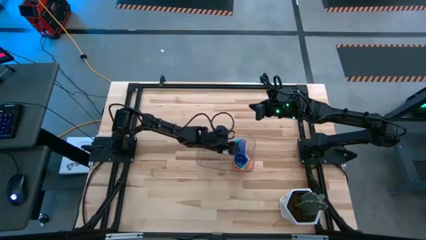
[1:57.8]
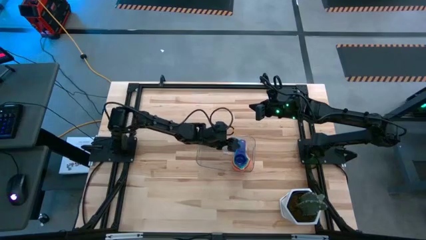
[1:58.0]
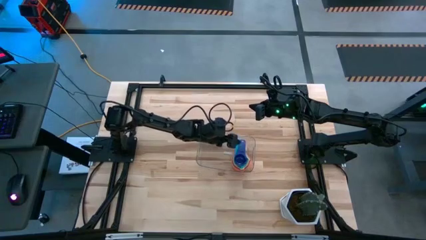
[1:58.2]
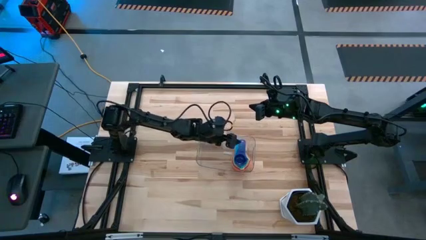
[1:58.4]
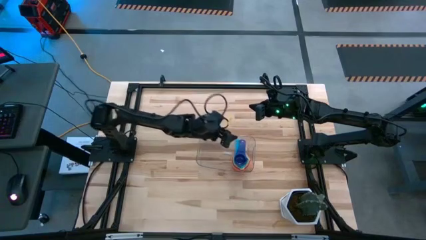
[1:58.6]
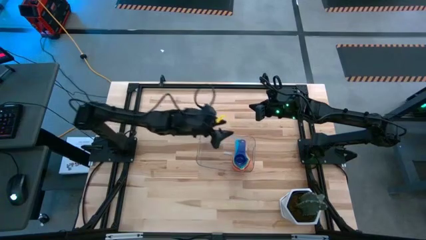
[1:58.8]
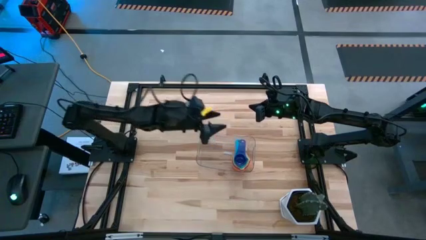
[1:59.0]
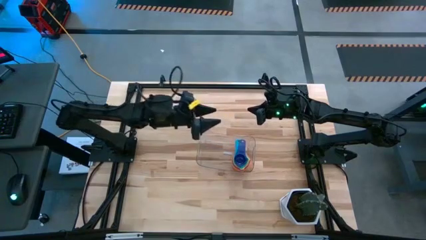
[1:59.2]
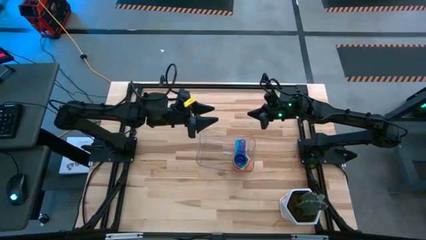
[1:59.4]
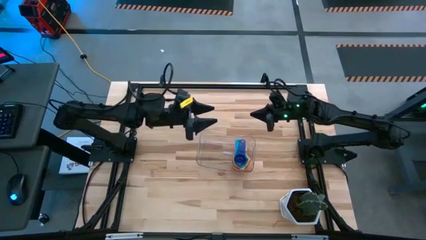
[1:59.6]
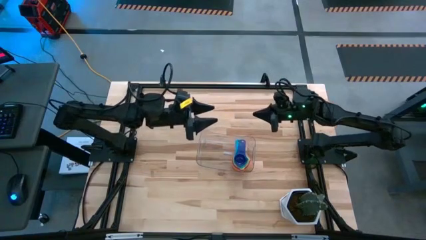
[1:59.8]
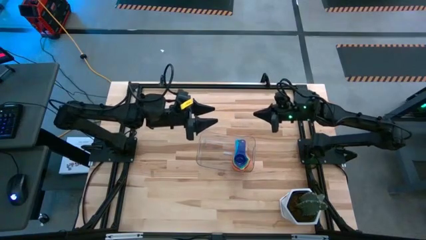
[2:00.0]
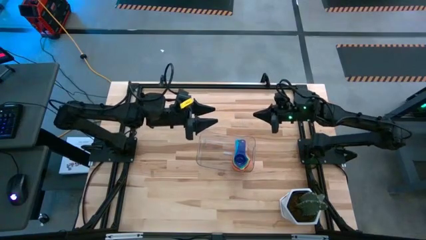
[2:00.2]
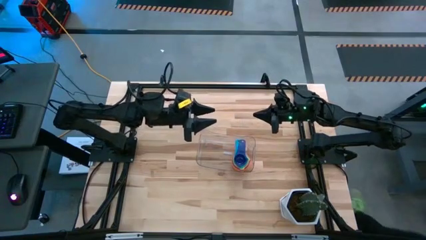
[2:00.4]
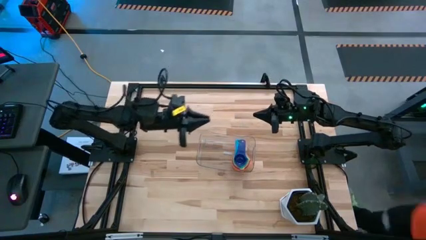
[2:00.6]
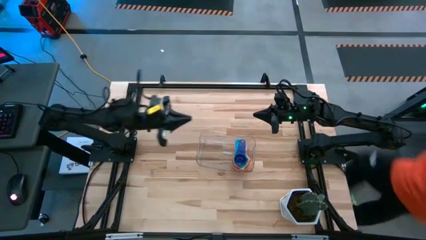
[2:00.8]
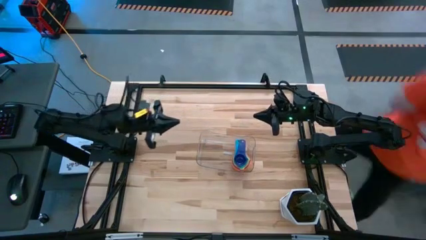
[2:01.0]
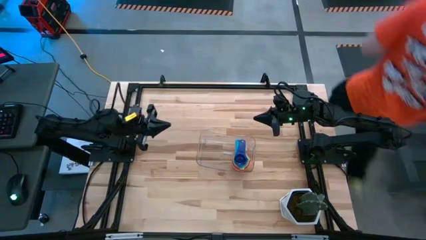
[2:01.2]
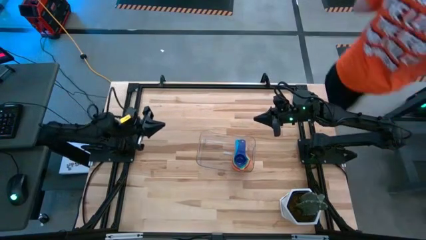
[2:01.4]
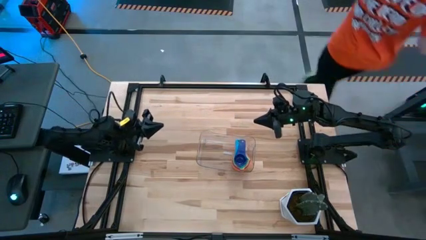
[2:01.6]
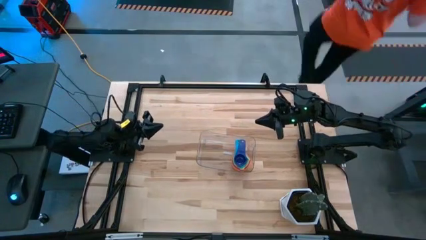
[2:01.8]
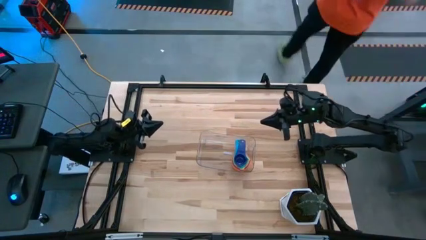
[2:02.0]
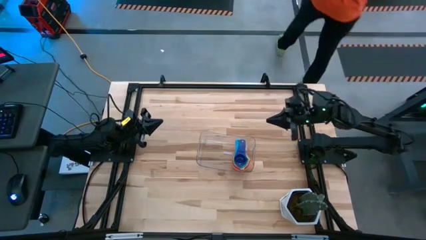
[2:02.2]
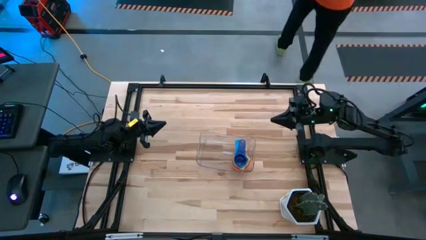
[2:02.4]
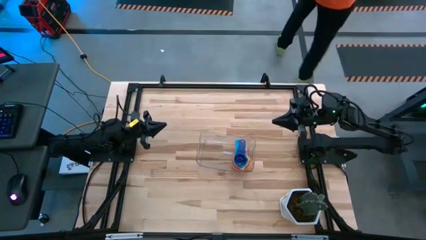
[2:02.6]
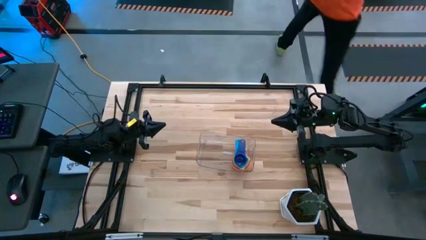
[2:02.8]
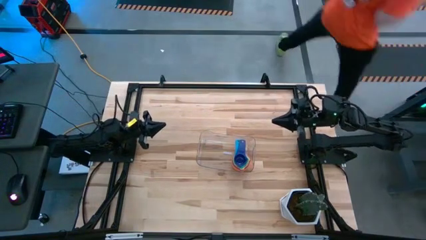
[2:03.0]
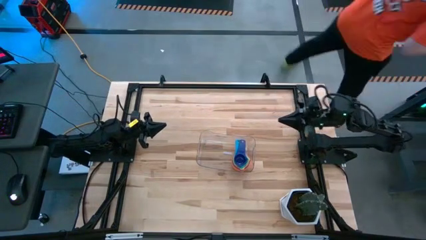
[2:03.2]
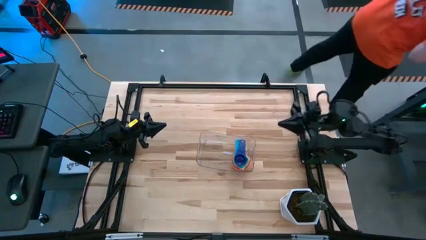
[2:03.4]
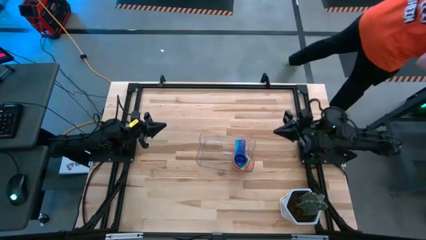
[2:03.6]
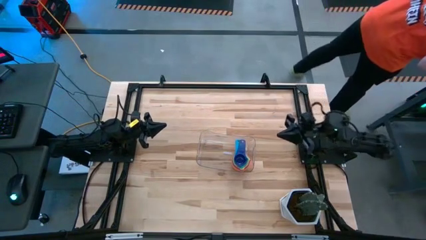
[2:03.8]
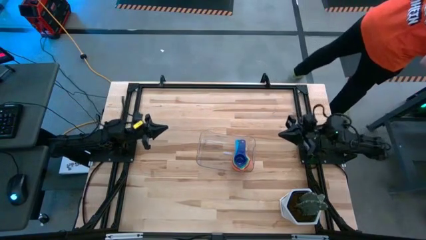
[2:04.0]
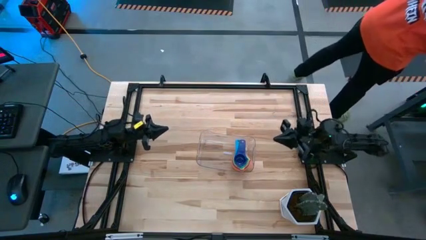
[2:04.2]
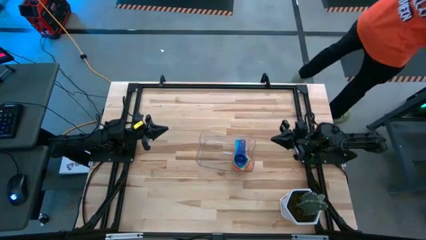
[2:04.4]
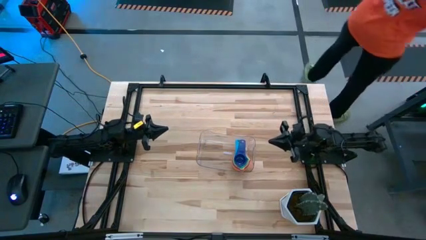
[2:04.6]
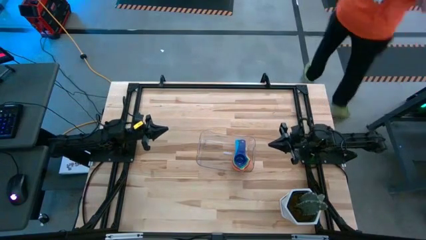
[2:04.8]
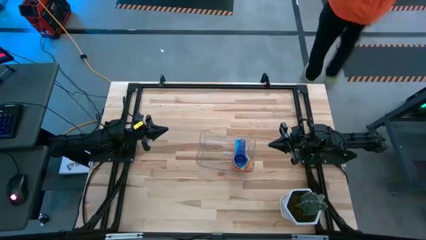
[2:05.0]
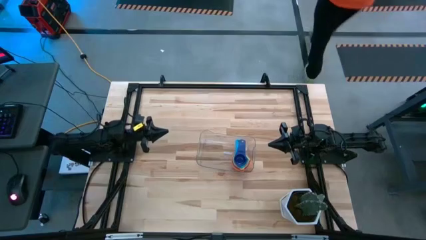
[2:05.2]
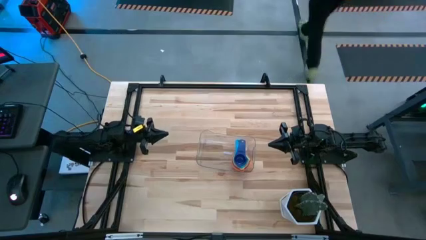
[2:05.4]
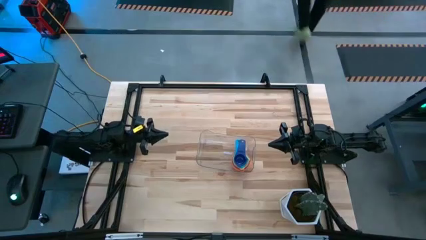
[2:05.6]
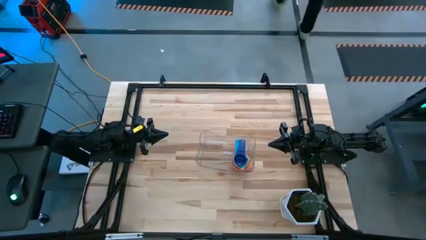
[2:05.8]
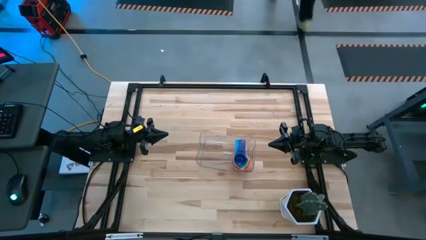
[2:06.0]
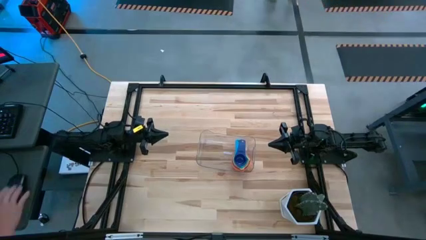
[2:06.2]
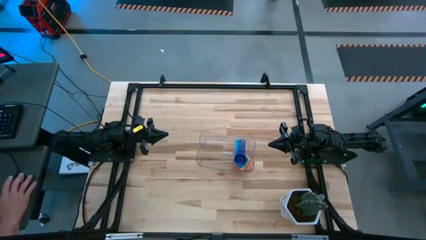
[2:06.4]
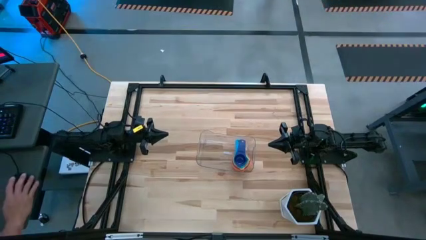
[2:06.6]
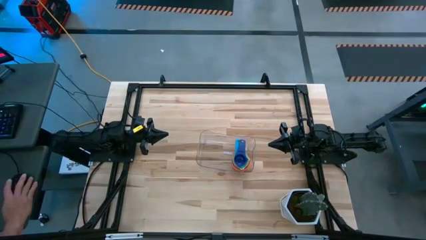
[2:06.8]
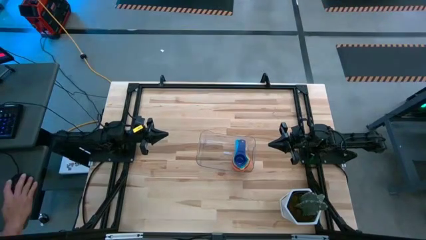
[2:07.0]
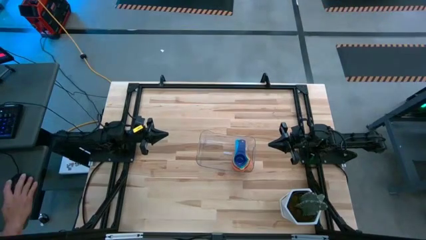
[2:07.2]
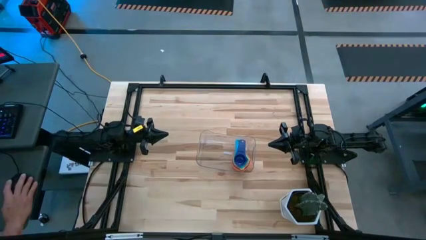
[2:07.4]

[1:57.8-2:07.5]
Task: Nest measuring cups in basket
Return to Home Position

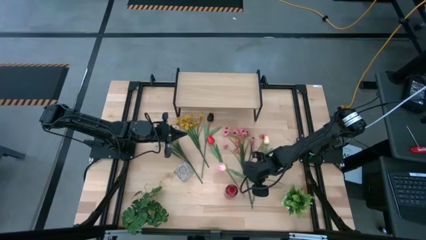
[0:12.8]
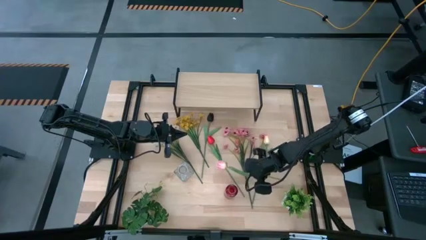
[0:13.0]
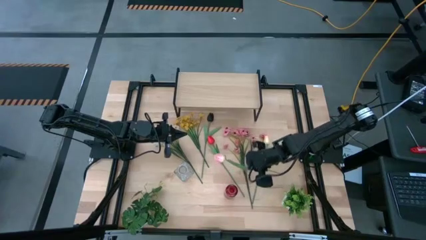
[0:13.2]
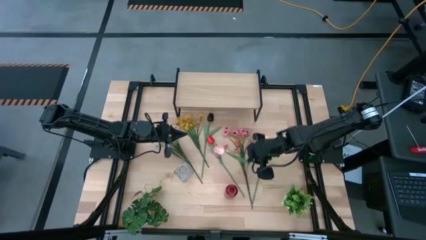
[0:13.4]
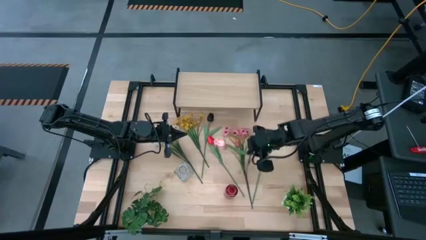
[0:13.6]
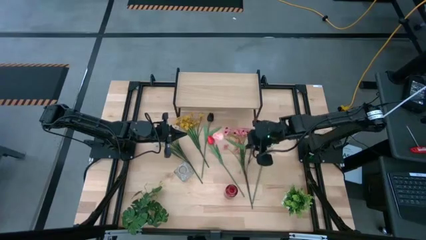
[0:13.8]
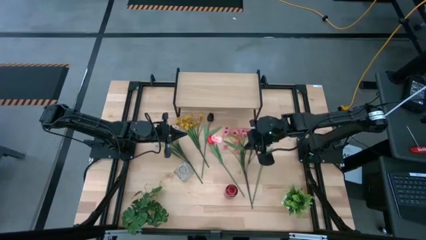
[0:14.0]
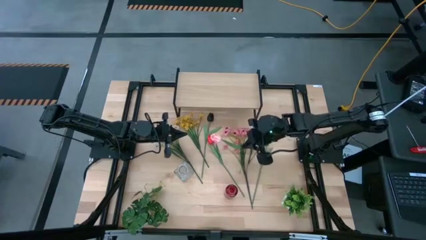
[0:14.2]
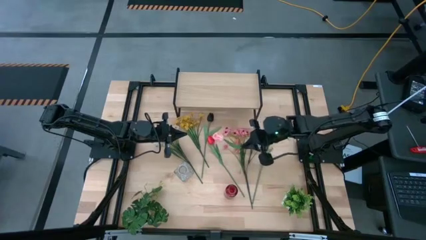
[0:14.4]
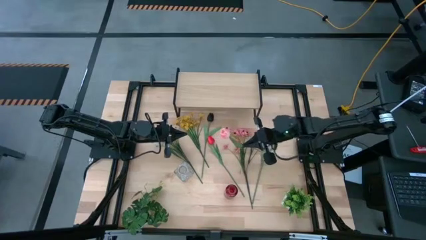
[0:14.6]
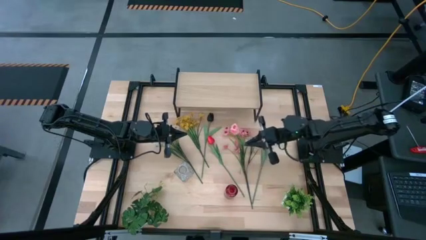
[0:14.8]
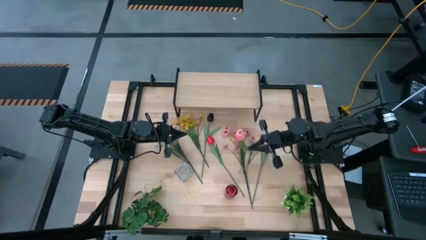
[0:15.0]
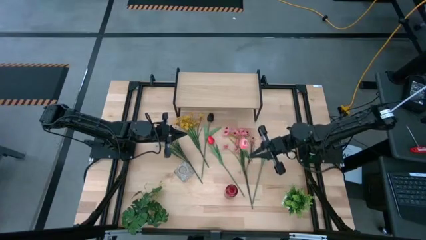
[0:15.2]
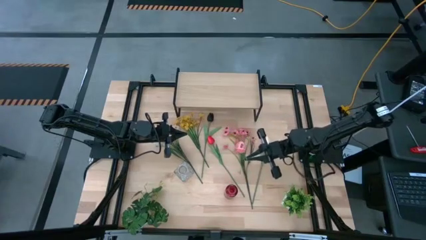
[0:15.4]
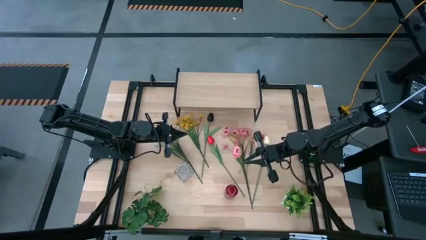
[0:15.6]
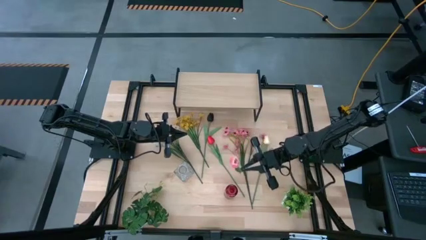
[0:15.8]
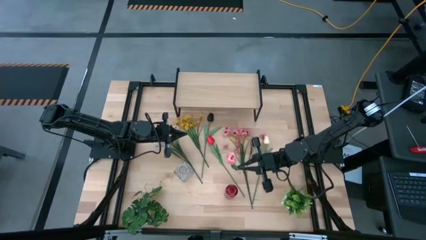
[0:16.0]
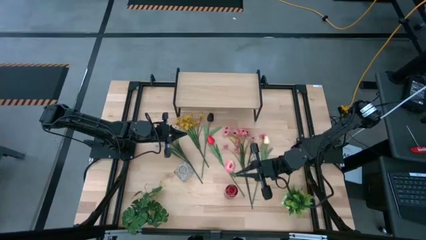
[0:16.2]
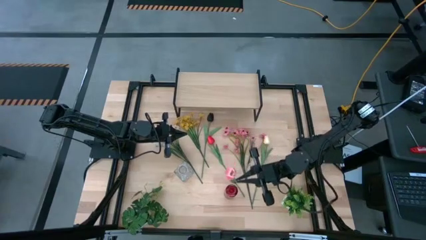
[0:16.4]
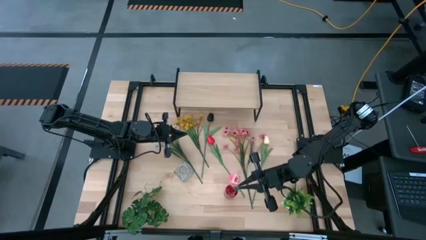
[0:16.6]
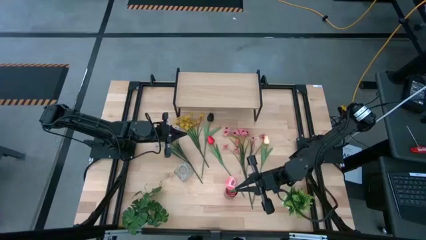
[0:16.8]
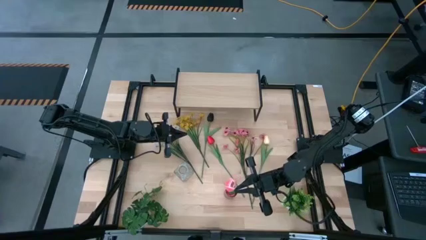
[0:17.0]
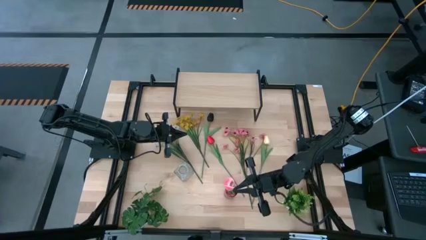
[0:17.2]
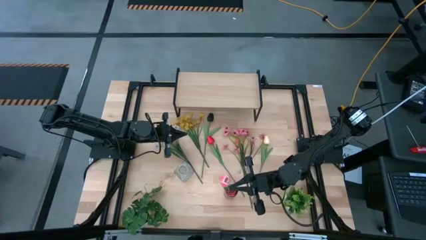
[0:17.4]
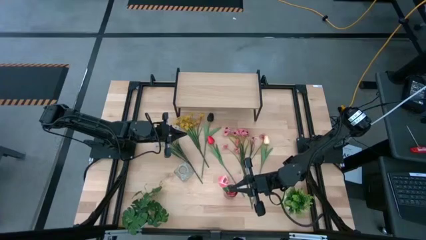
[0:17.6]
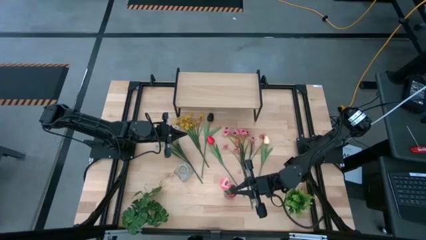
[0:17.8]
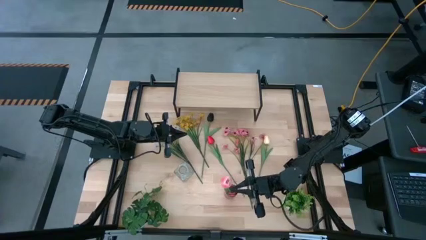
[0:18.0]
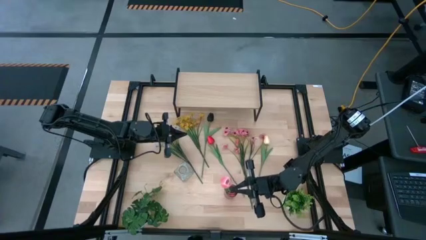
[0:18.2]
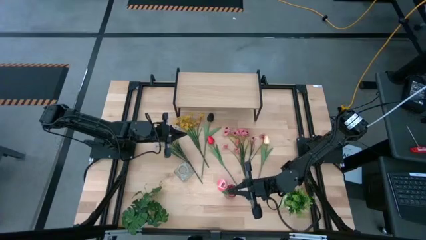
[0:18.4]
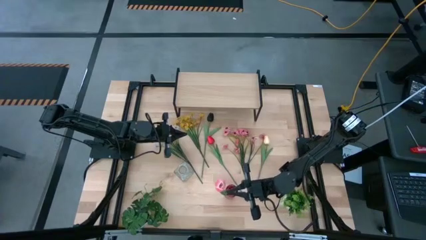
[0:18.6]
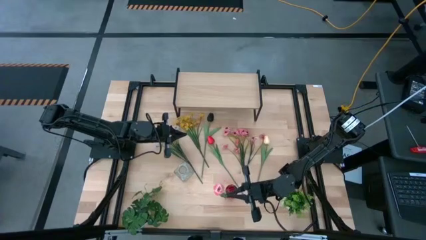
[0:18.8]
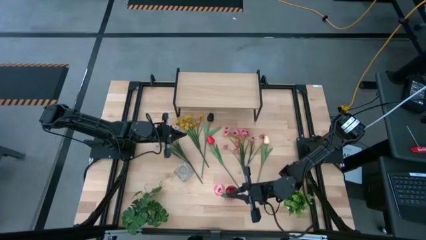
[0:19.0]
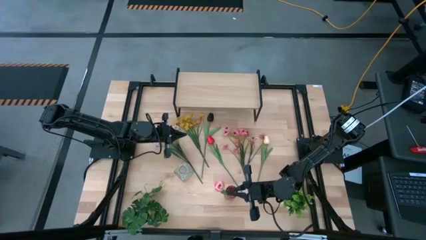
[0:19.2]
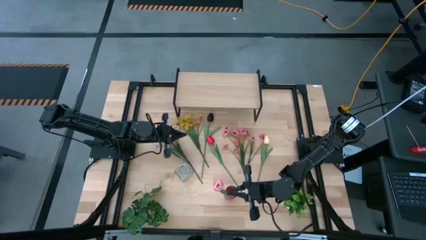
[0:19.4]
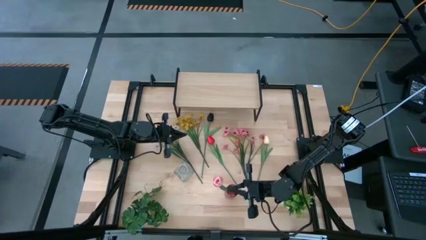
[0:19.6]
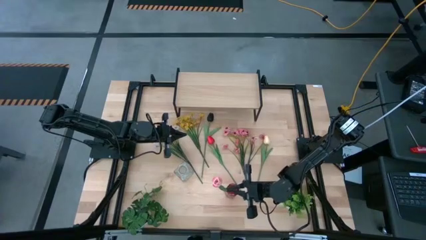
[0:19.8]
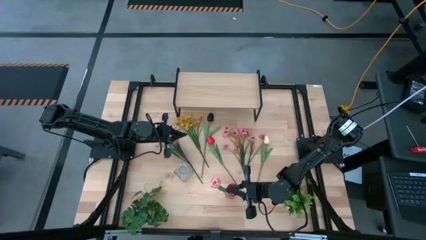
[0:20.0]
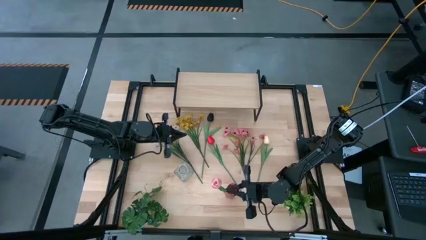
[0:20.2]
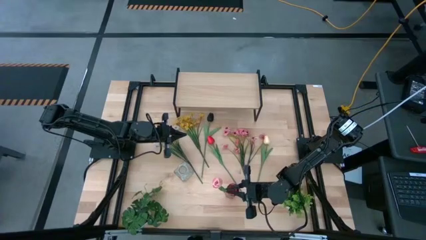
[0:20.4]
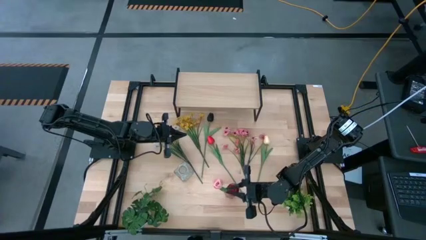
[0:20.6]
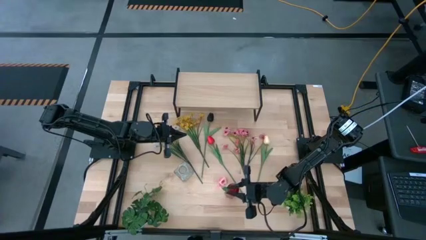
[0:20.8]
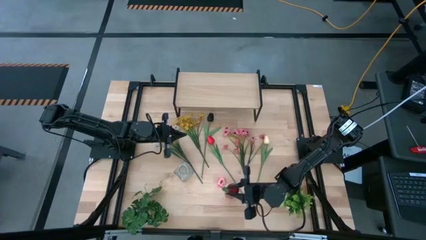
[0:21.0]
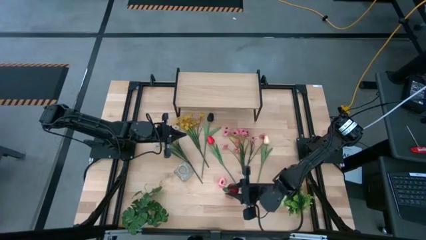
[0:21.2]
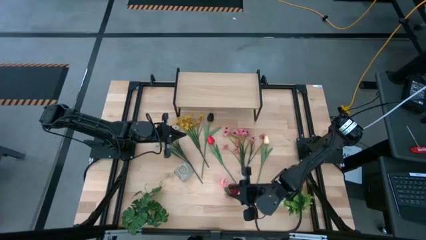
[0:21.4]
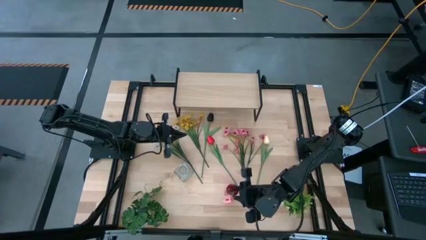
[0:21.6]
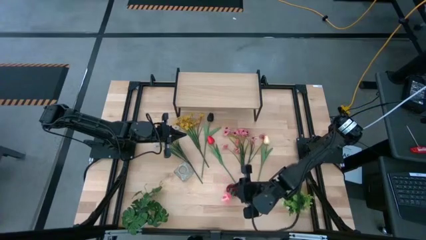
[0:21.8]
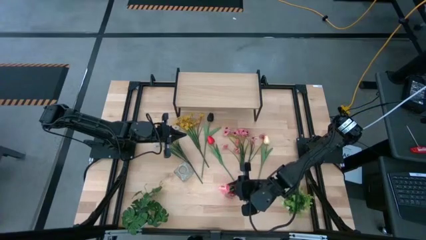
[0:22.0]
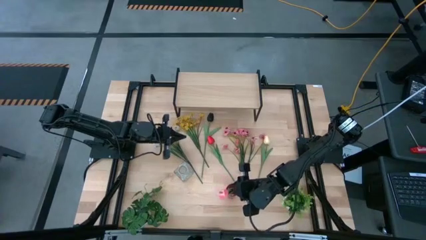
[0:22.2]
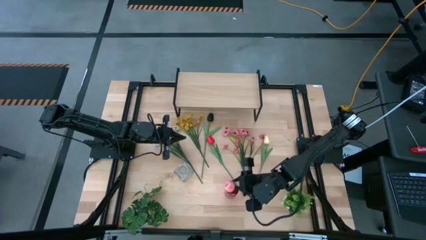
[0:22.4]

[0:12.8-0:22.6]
Task: Pick and place flowers into a vace then onto a shelf
Put the pink tulip into the red vase
